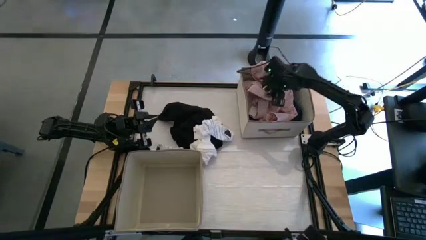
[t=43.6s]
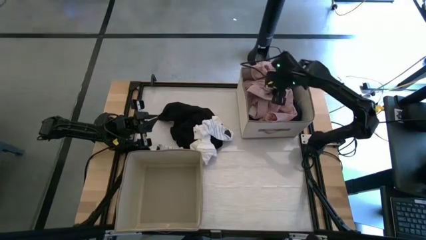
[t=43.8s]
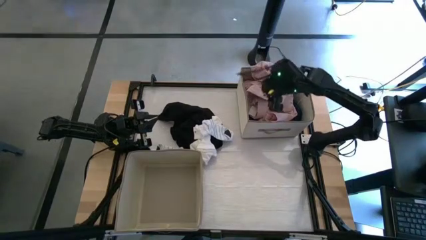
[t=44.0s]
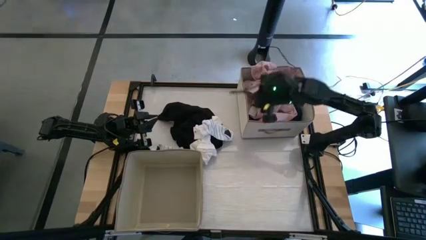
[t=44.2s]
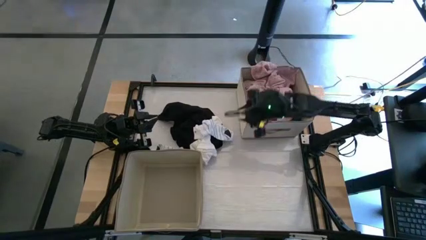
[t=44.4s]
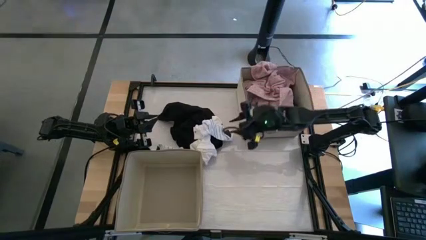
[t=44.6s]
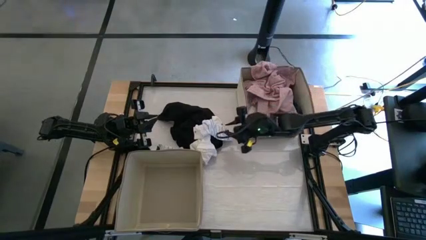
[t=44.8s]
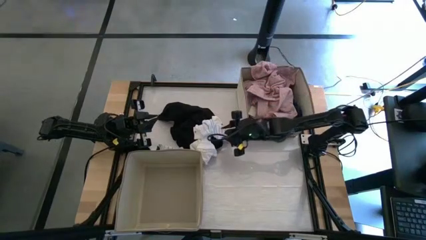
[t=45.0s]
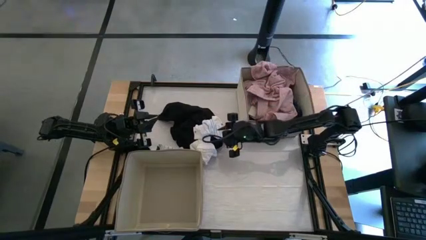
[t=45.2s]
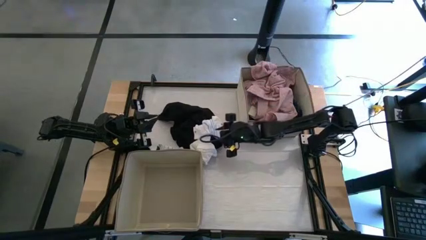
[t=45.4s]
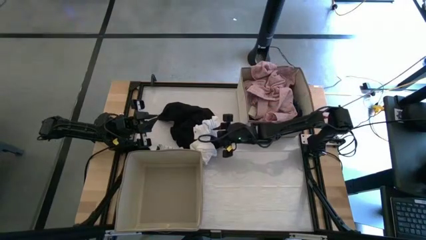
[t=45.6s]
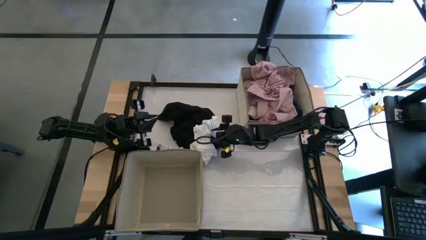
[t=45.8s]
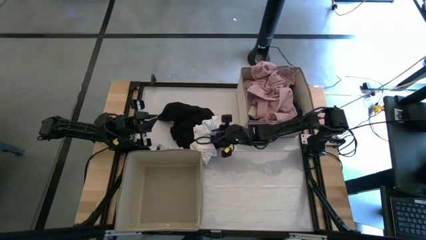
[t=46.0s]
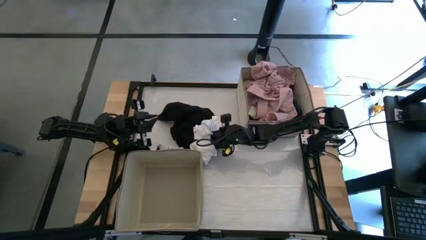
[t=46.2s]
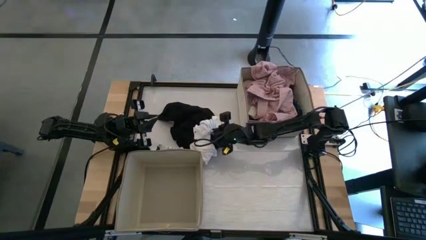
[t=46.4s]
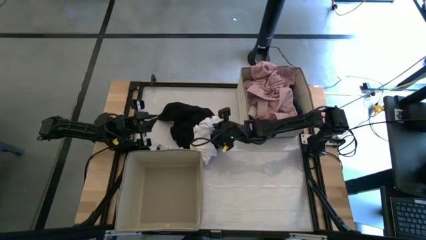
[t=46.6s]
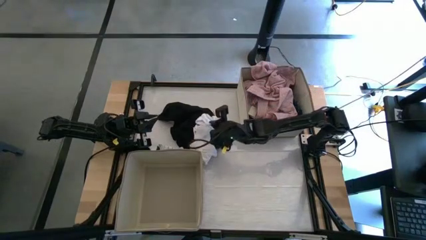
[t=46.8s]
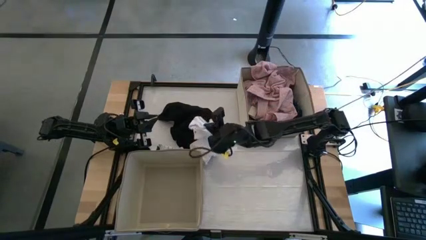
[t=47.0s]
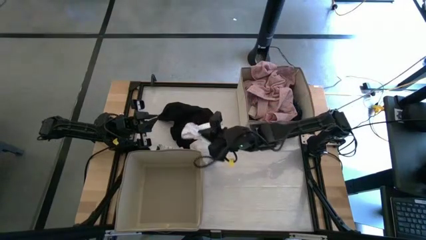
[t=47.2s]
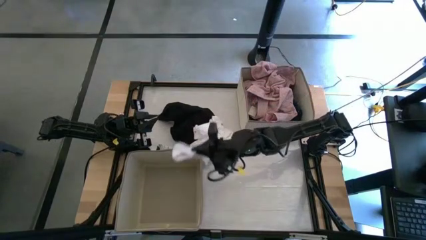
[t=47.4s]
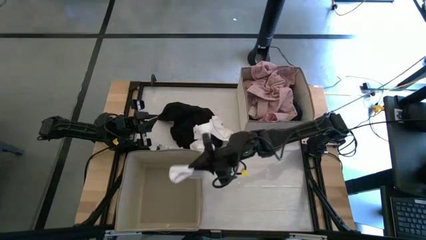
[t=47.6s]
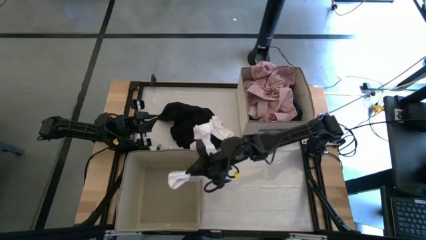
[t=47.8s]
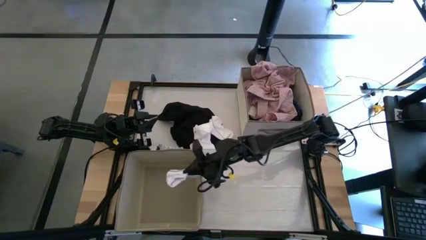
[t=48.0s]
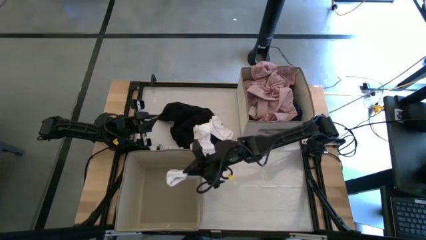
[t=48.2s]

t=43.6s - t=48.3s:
Task: Sort clothes
Put the white striped sock into the left laundry organizer

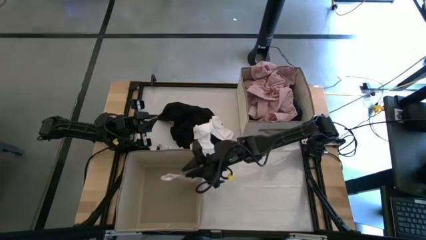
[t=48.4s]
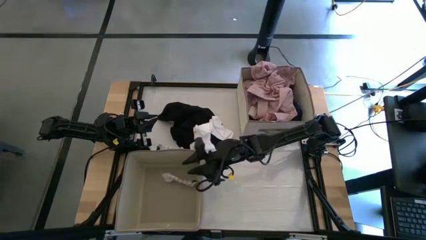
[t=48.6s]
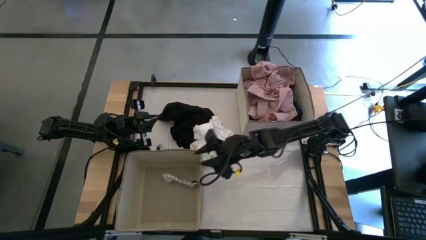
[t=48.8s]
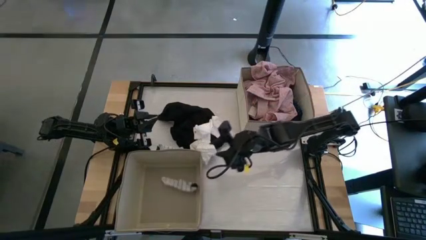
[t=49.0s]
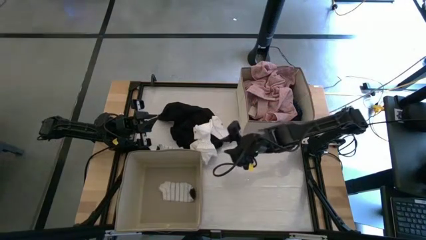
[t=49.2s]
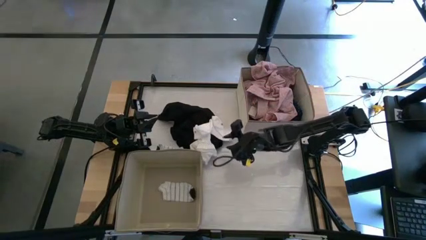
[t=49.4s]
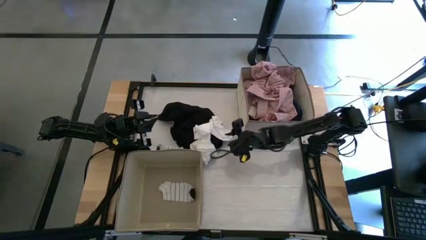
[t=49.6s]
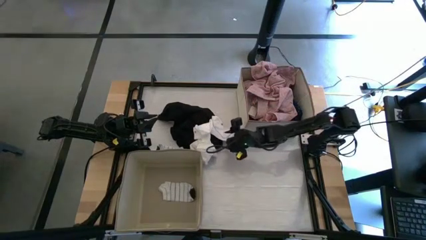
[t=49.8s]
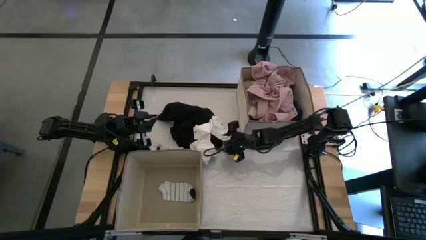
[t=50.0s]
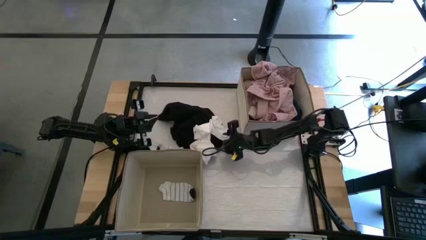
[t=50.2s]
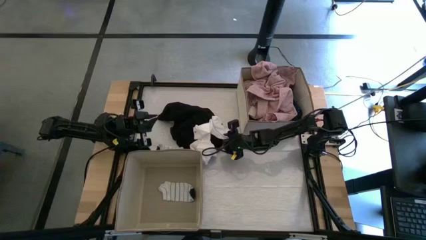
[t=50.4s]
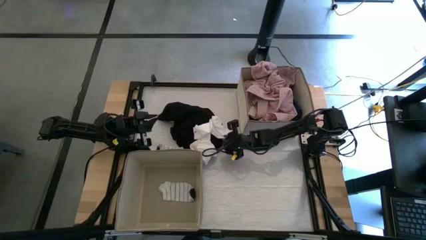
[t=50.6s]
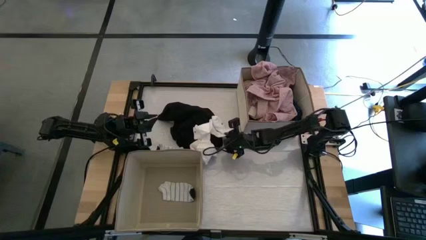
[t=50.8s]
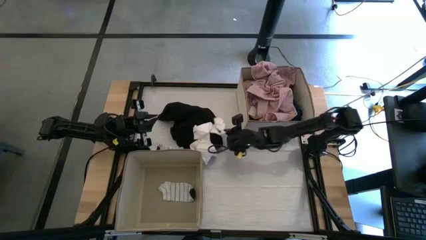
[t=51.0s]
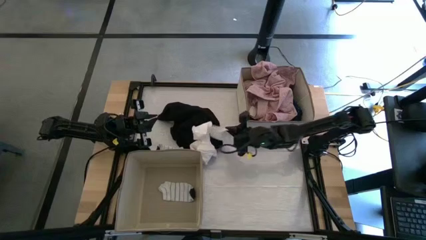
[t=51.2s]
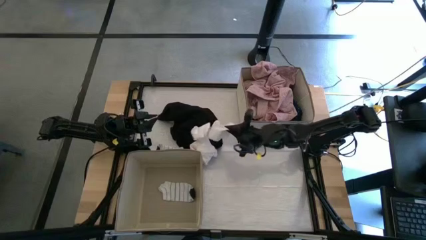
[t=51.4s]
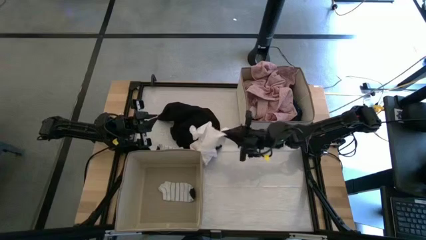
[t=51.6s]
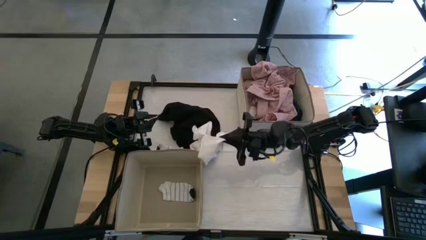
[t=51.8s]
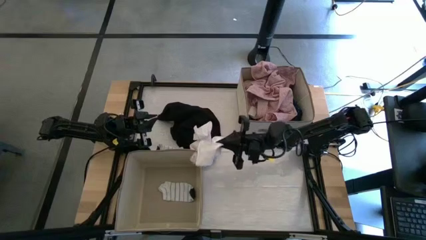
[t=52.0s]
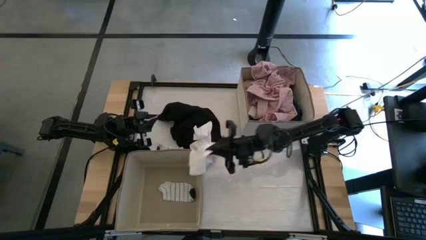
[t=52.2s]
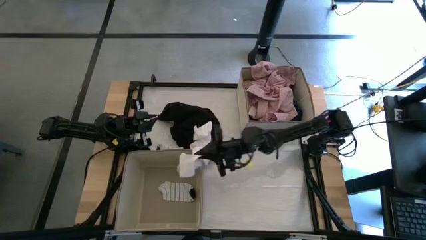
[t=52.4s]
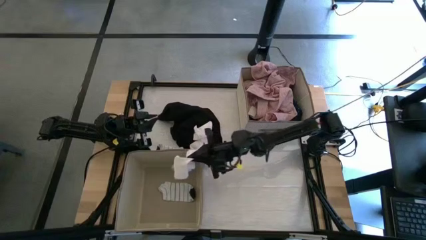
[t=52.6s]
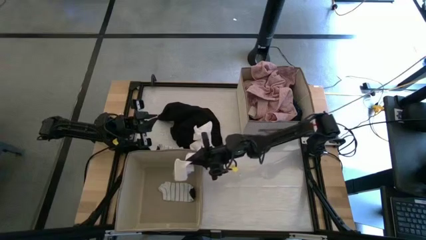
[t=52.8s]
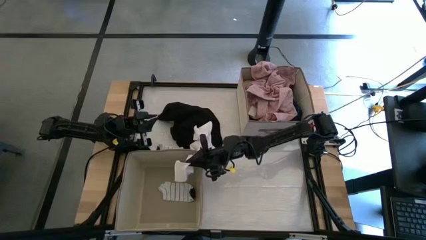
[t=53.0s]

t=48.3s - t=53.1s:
Put the white sock into the left laundry organizer

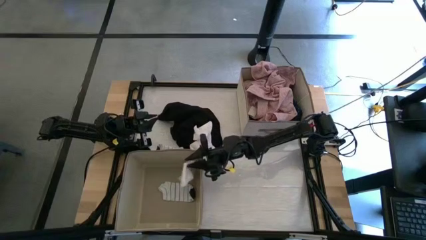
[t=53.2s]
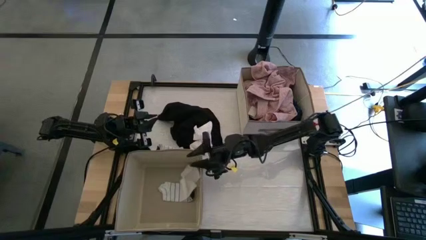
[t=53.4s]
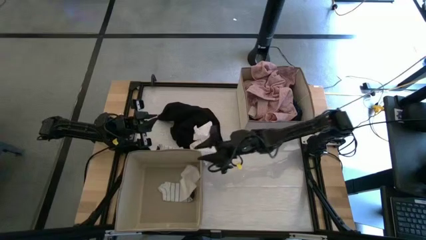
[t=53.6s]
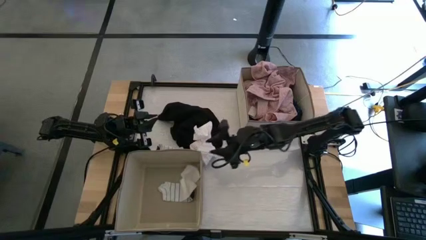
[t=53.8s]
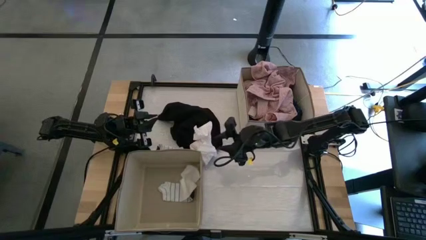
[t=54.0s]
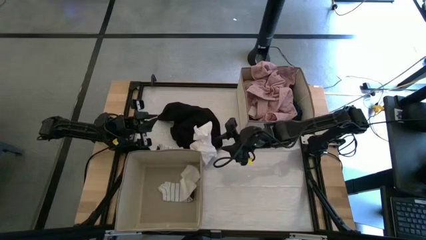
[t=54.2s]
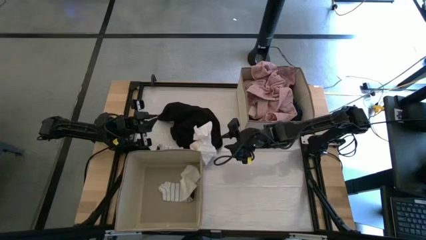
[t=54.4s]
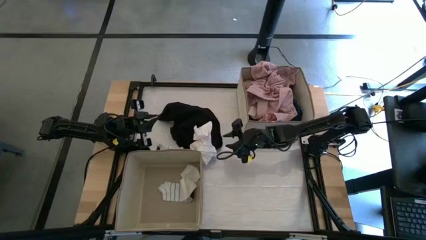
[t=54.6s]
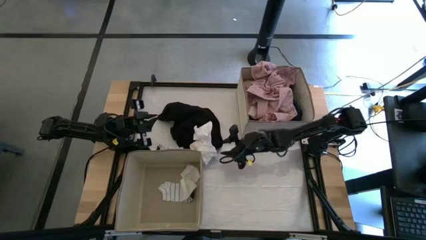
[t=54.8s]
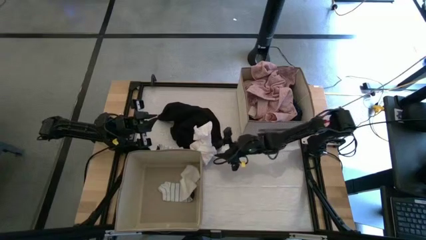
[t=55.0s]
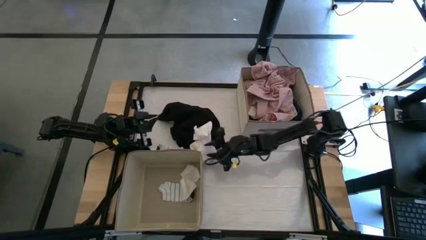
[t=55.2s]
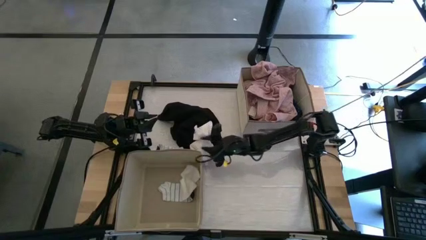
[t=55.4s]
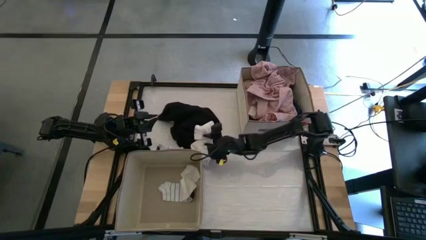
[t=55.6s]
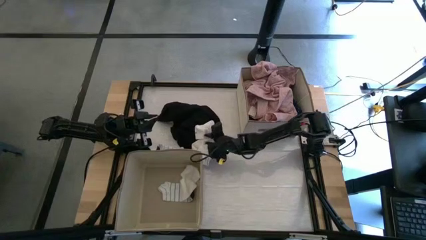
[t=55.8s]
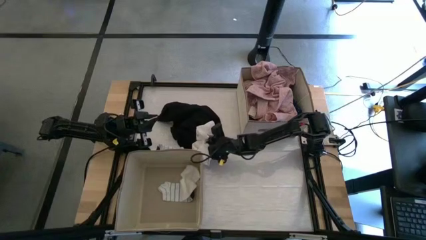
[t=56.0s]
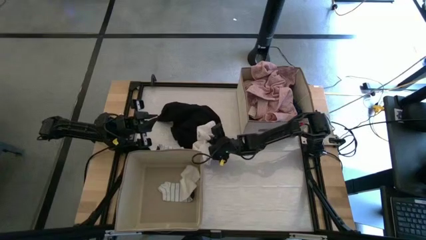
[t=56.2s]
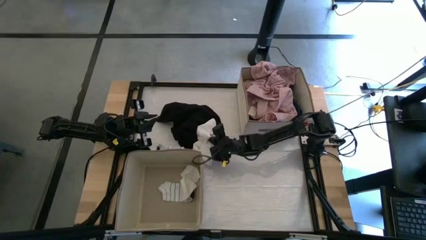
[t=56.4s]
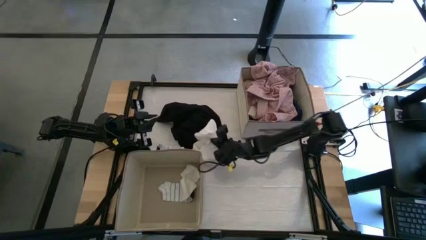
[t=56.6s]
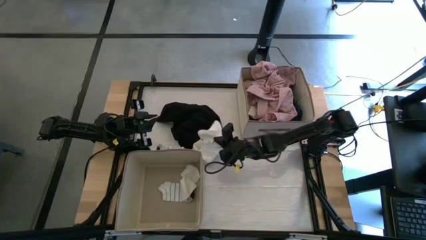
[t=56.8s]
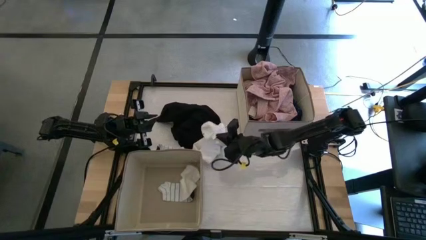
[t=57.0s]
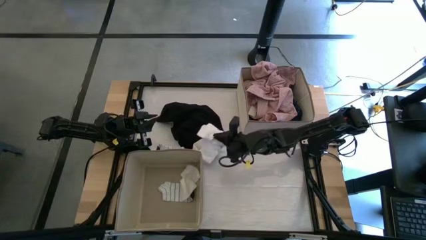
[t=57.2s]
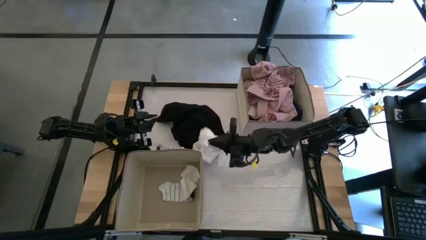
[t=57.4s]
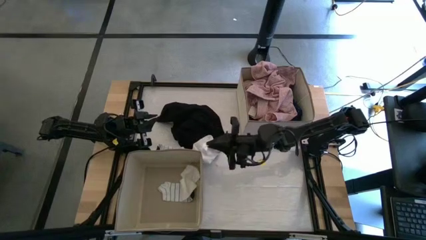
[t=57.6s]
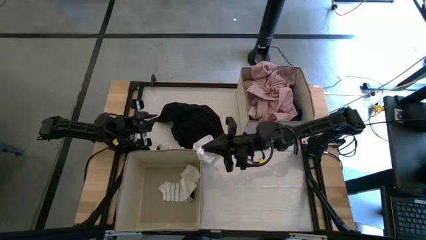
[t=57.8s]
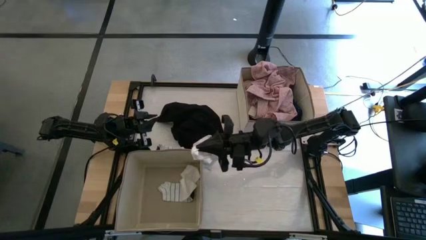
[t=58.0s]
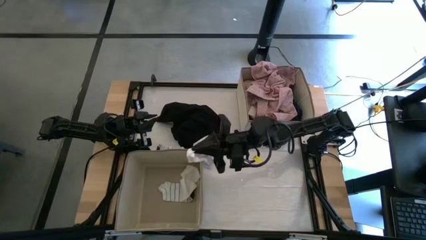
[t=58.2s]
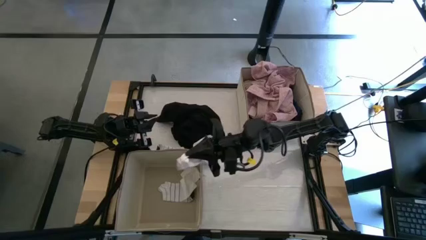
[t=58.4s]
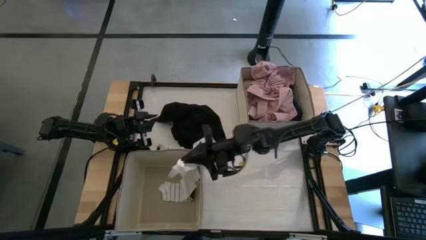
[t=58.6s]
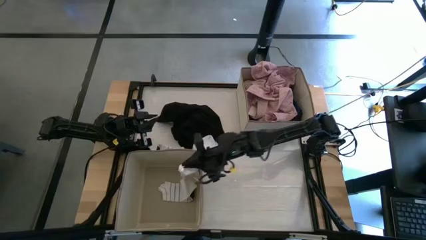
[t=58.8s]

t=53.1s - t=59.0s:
Put the white sock into the left laundry organizer

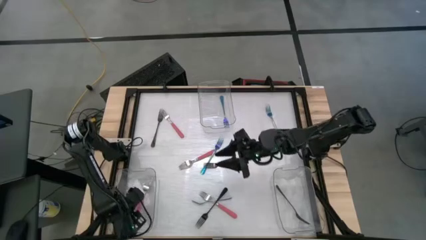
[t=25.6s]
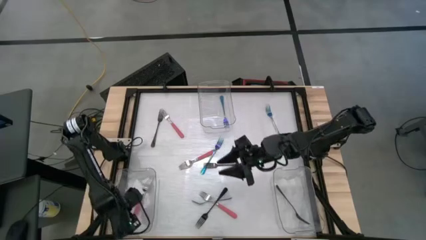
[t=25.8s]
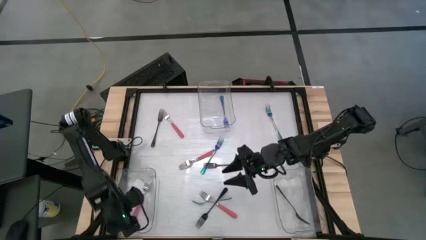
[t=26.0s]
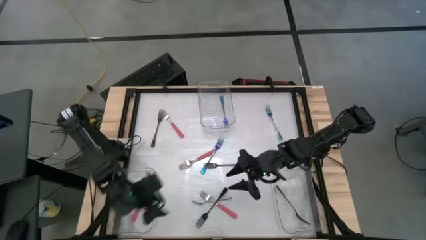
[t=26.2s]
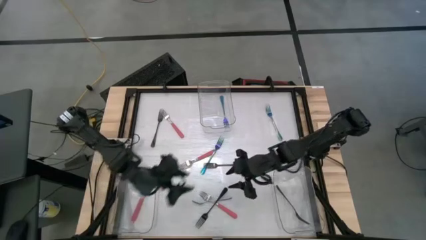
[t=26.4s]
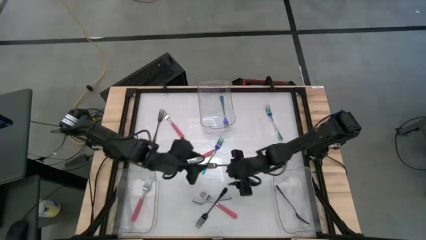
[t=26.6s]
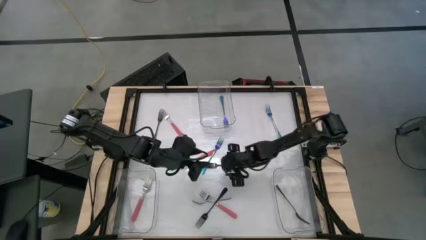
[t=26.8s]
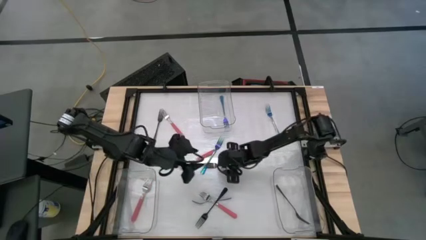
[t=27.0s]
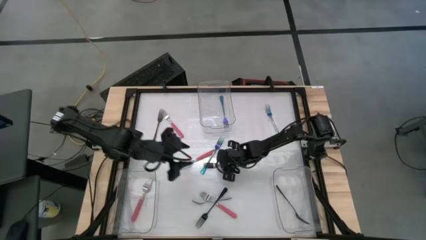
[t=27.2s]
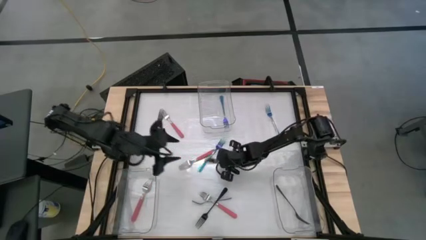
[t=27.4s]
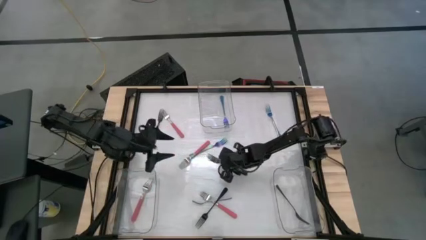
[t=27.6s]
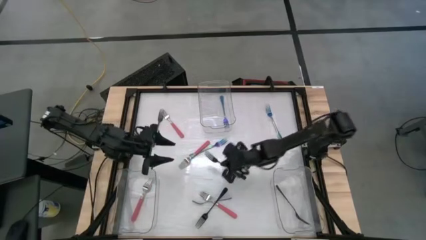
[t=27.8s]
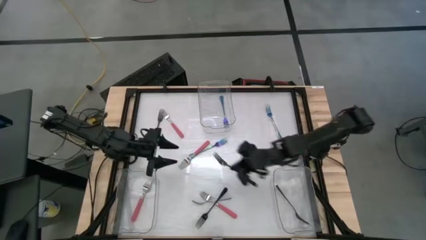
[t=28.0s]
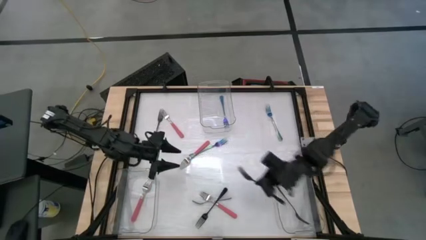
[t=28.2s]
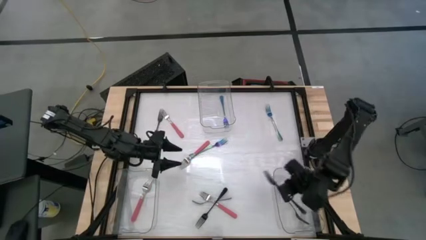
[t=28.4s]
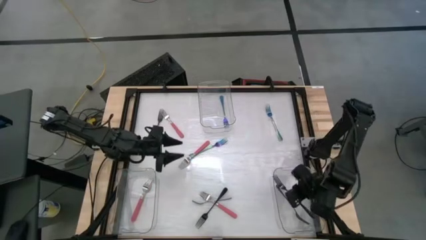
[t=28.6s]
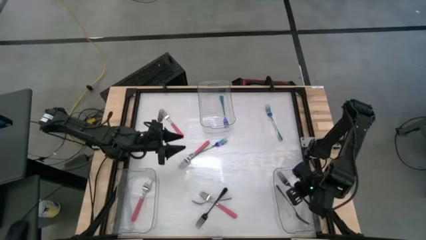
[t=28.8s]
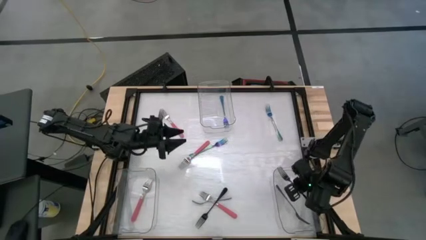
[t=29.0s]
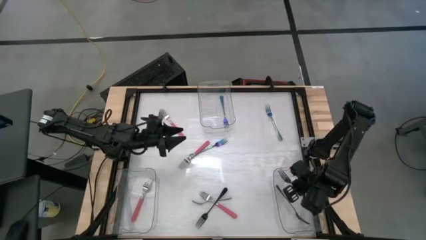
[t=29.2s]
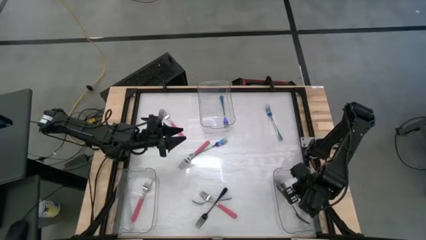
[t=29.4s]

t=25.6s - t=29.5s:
Task: Sort silverware by color (type)
Put the black fork into the bottom right transparent bin
